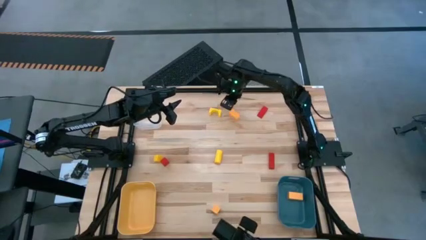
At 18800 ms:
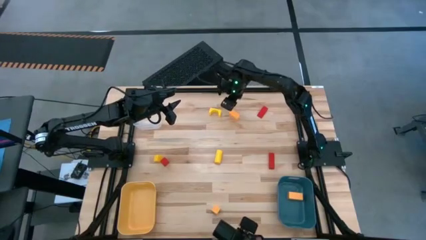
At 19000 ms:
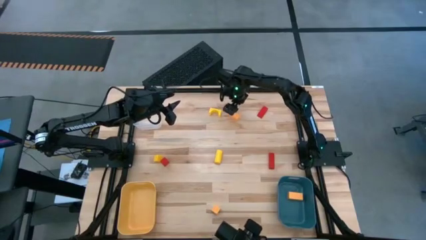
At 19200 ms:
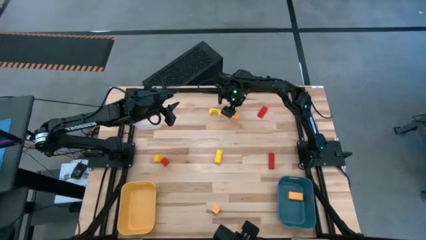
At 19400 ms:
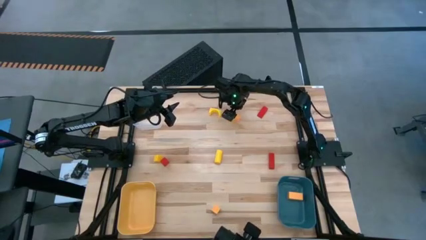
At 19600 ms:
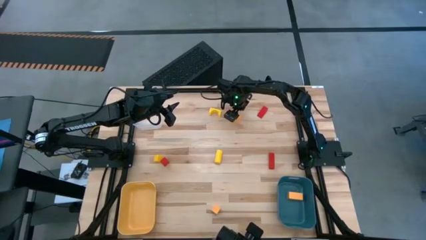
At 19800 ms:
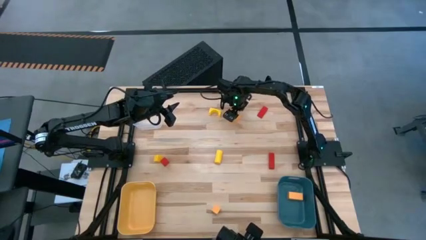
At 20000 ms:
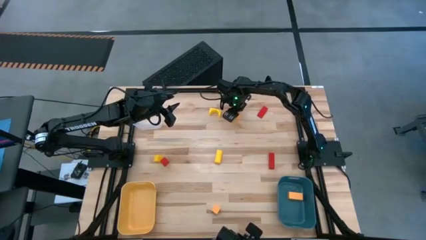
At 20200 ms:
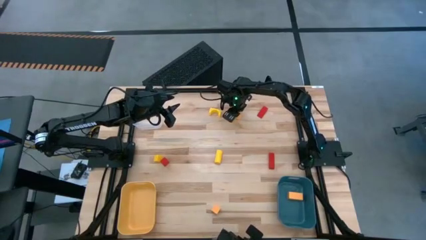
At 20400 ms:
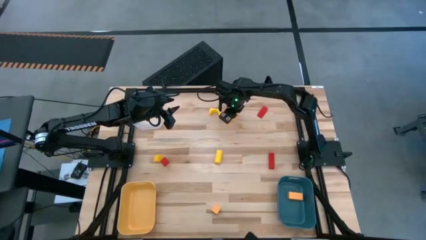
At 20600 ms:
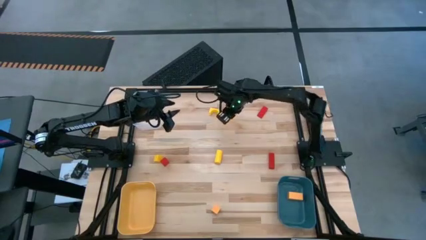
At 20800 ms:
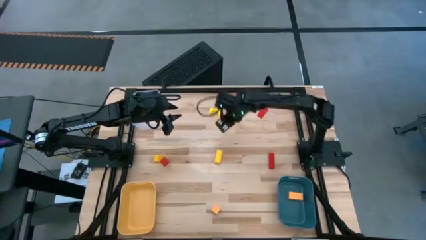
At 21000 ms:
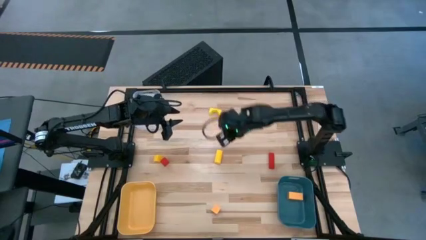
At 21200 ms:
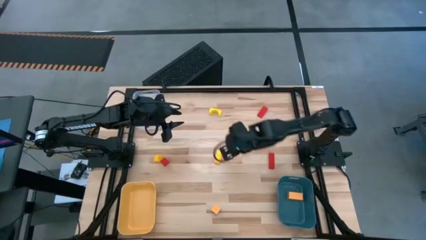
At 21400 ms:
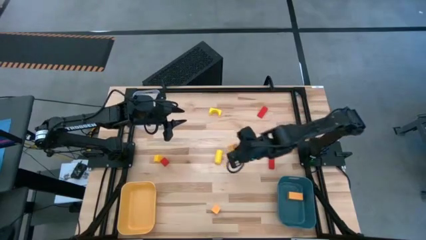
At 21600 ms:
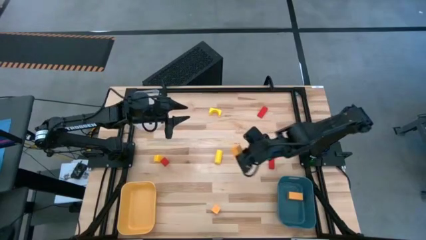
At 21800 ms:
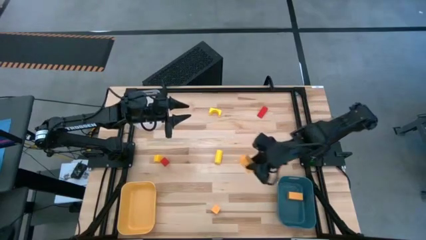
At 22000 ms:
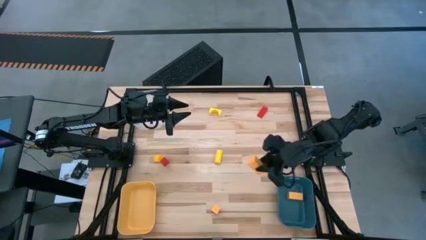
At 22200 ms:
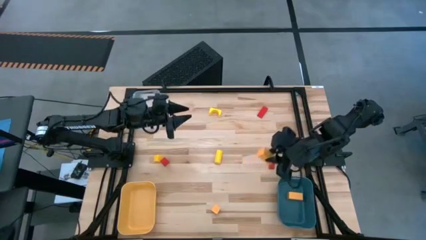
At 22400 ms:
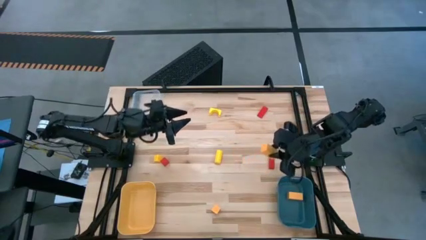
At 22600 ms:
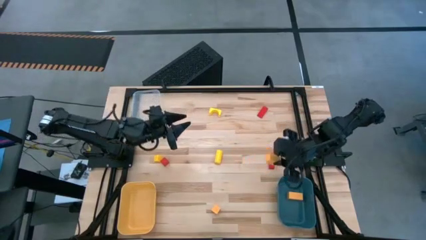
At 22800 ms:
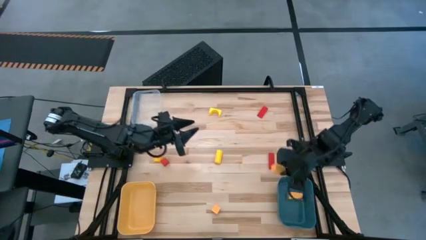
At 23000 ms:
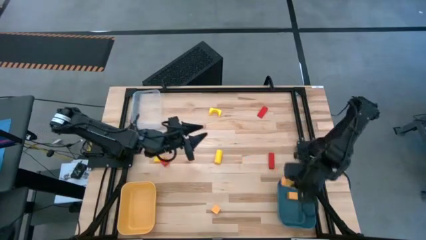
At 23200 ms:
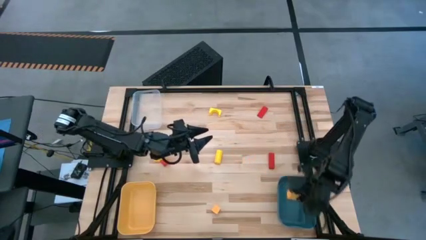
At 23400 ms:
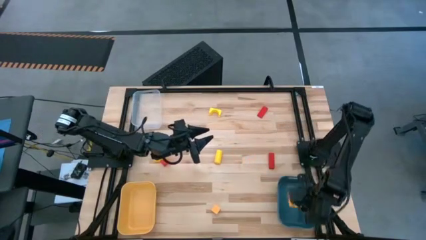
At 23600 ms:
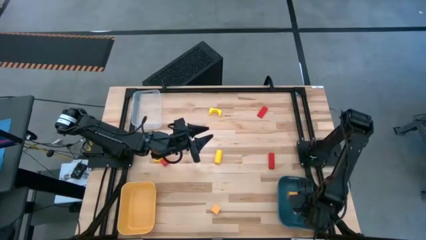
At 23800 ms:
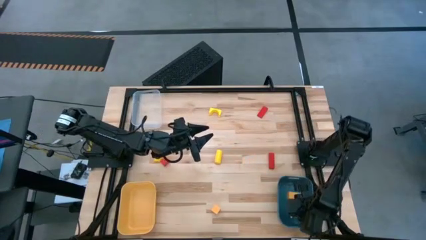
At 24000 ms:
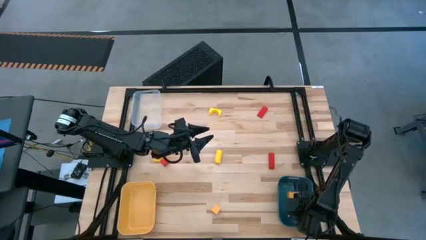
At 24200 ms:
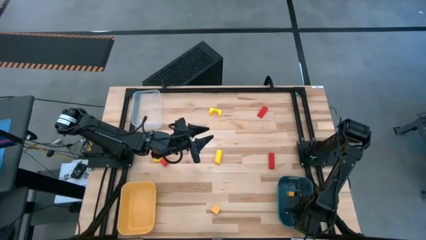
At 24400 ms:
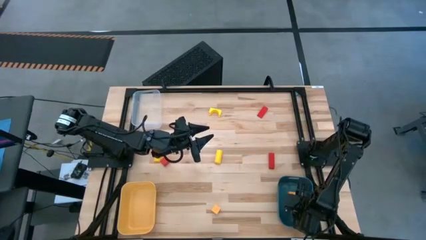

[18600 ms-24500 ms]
Task: Sort & place blocks by color
Put the top orange block in the dark green bin

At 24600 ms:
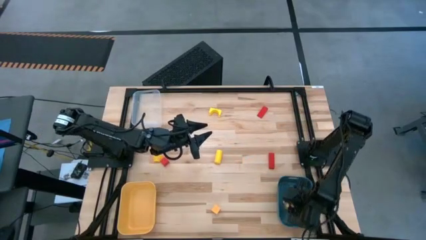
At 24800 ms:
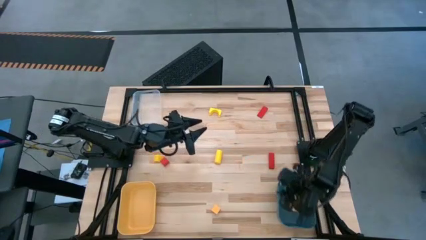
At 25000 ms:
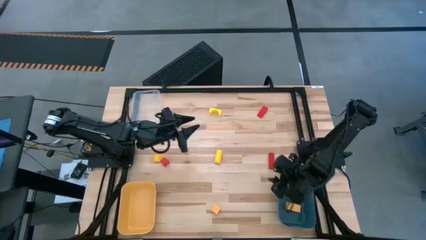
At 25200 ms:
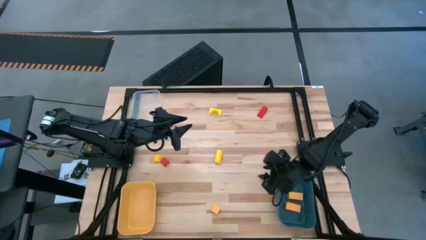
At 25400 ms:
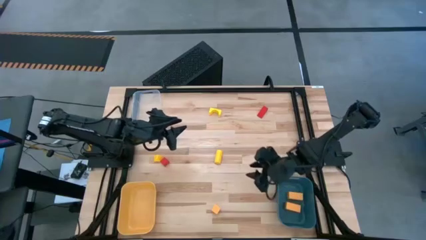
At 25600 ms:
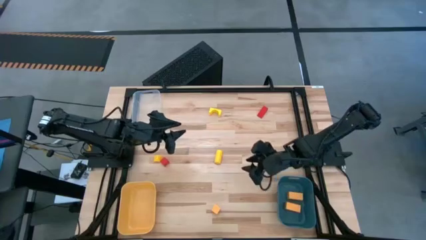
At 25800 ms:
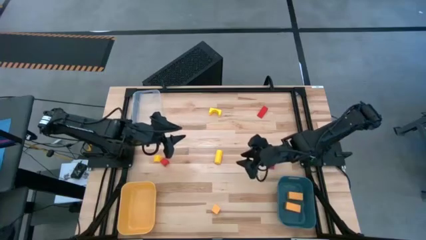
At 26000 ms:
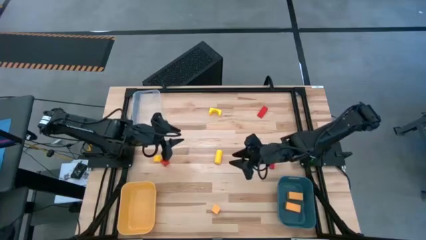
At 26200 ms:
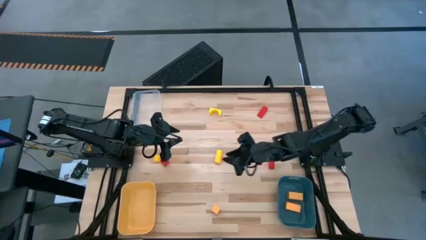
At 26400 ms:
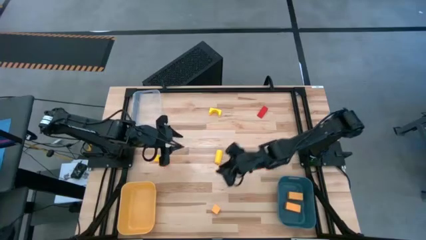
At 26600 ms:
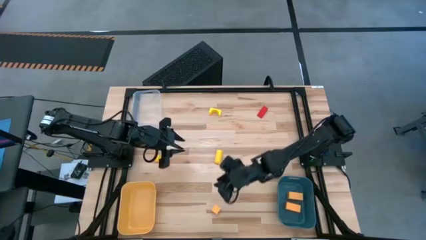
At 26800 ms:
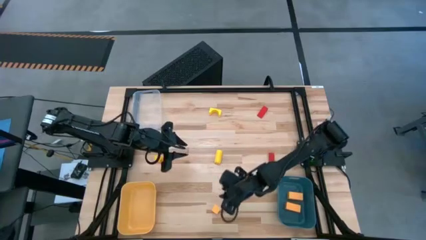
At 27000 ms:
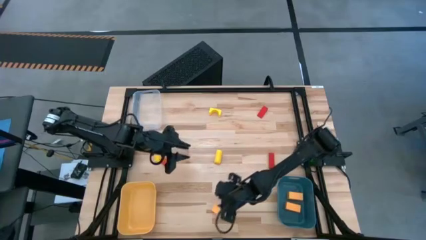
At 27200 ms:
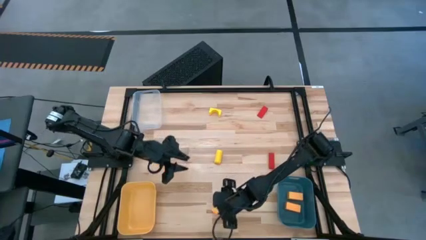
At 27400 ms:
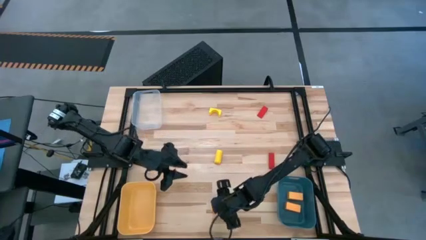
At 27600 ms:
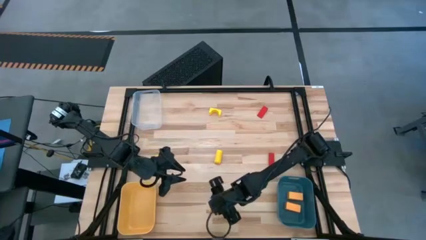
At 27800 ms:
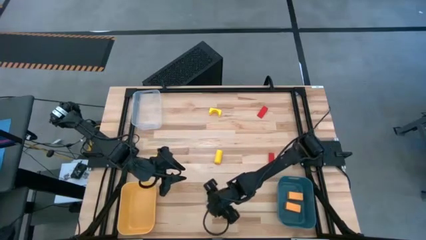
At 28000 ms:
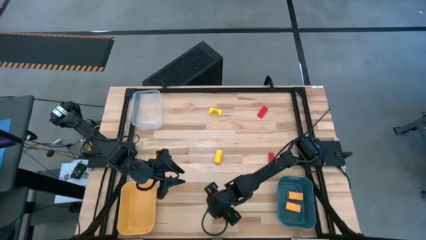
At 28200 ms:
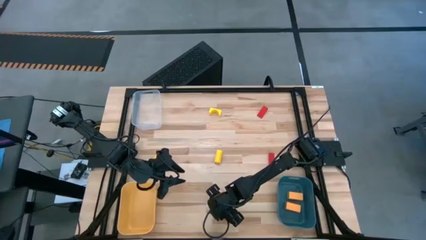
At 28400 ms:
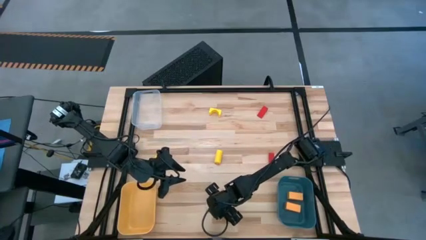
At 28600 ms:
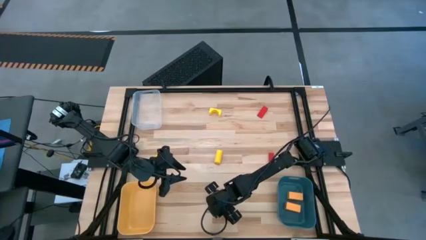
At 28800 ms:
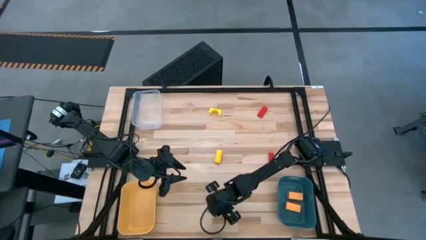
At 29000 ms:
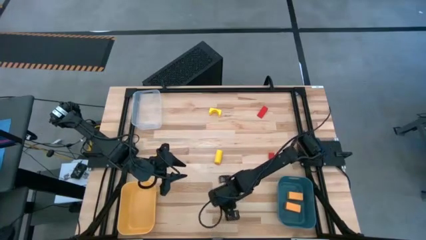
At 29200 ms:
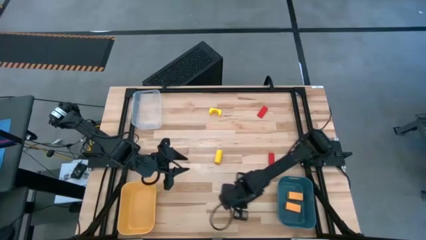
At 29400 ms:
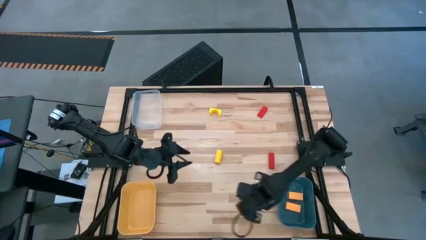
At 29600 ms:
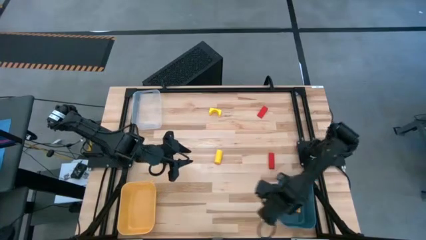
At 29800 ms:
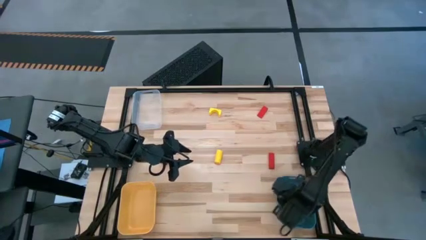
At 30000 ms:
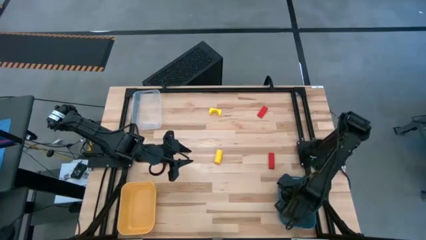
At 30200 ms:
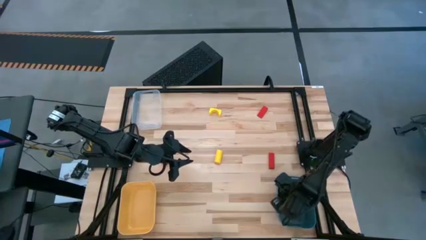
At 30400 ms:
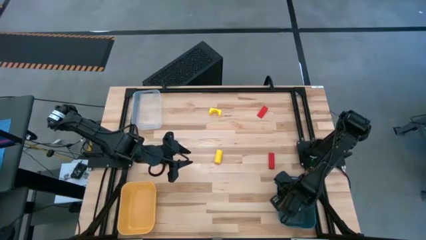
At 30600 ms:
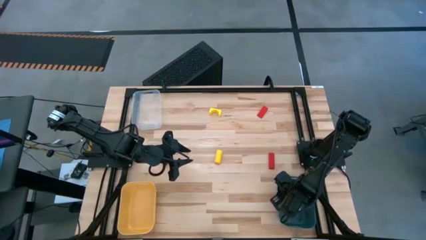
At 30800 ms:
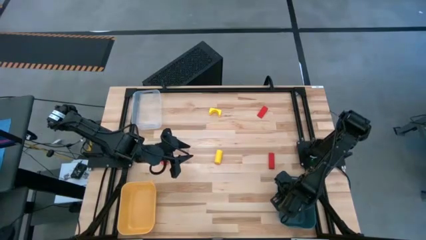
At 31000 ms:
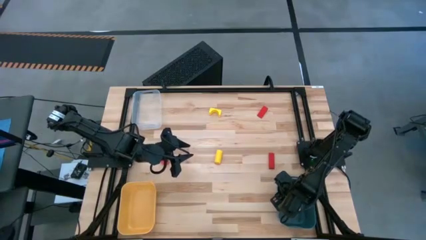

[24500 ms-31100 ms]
Put the orange block in the dark green bin
